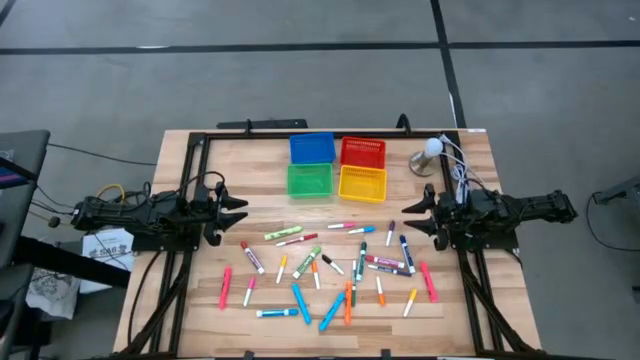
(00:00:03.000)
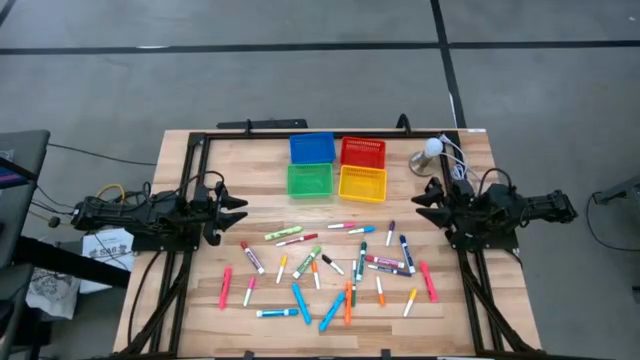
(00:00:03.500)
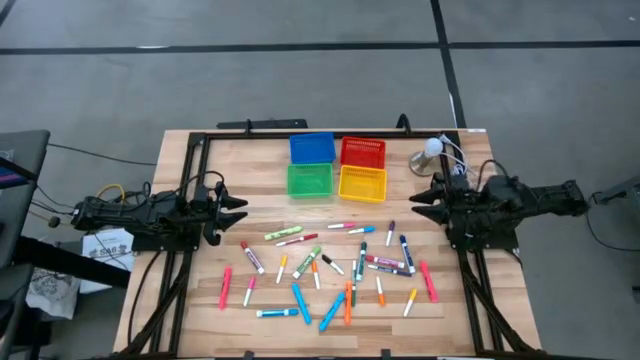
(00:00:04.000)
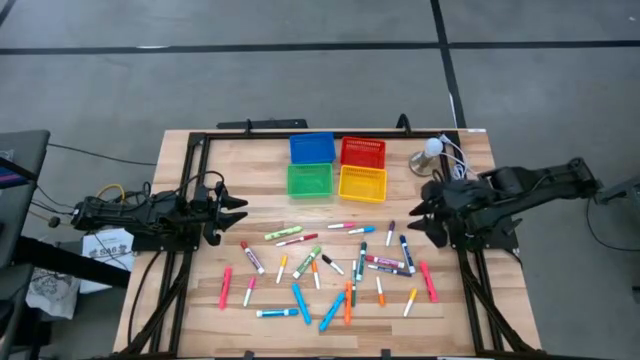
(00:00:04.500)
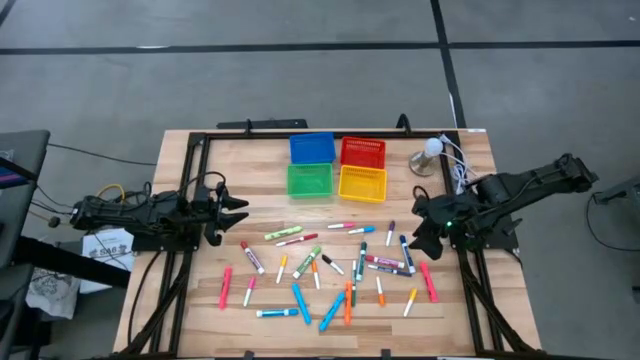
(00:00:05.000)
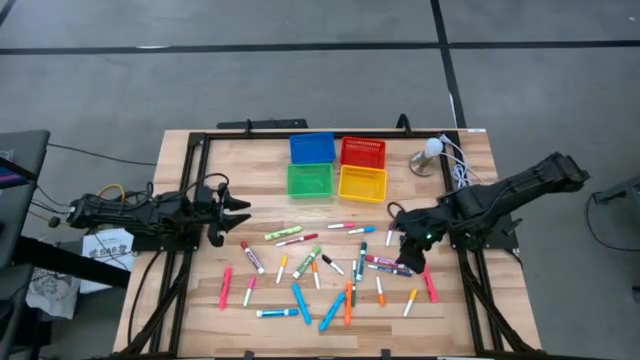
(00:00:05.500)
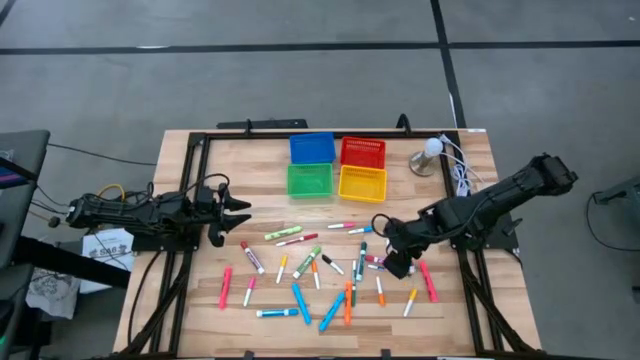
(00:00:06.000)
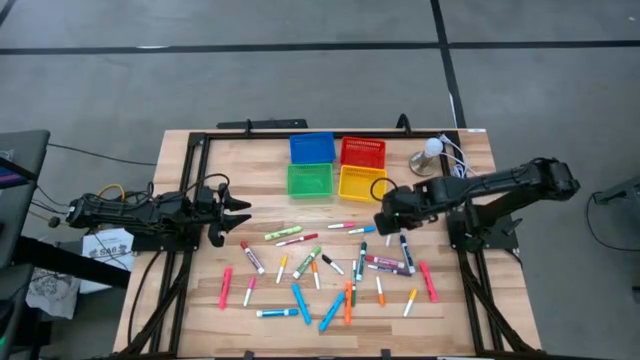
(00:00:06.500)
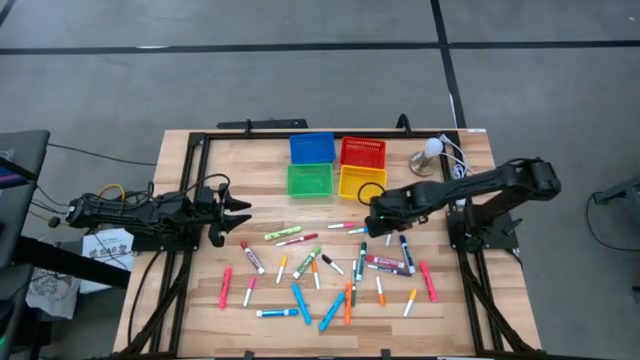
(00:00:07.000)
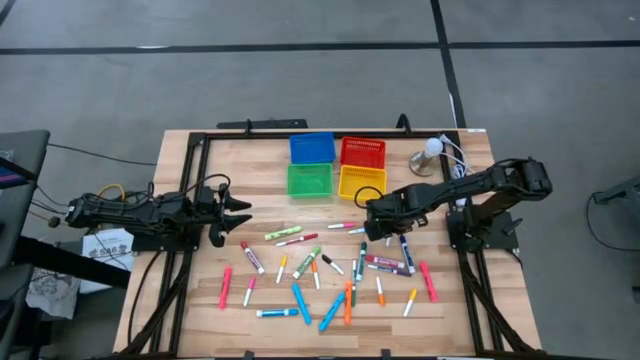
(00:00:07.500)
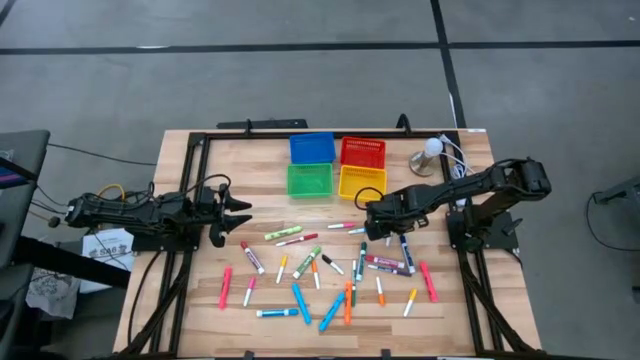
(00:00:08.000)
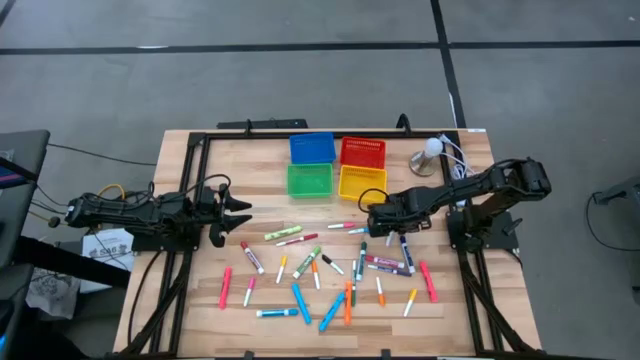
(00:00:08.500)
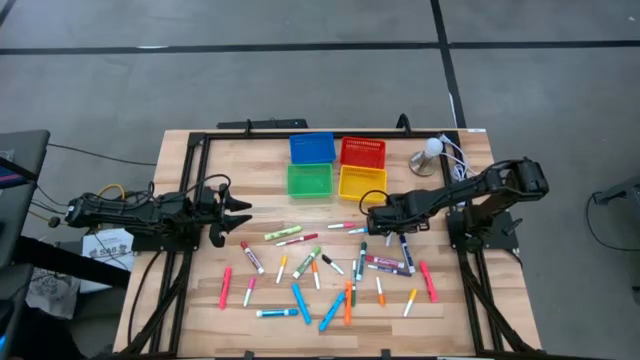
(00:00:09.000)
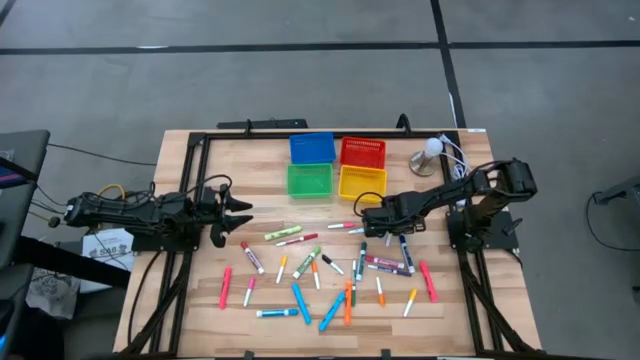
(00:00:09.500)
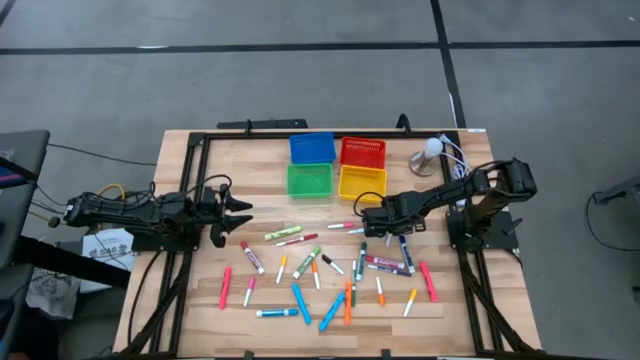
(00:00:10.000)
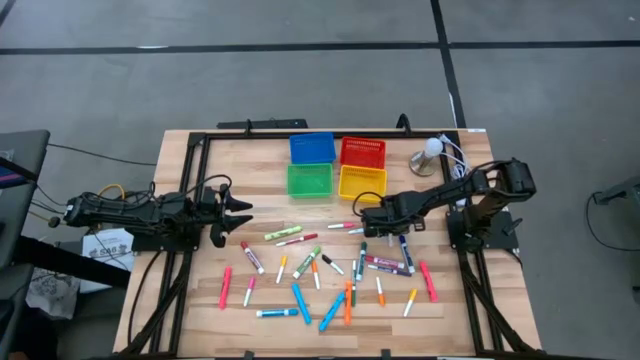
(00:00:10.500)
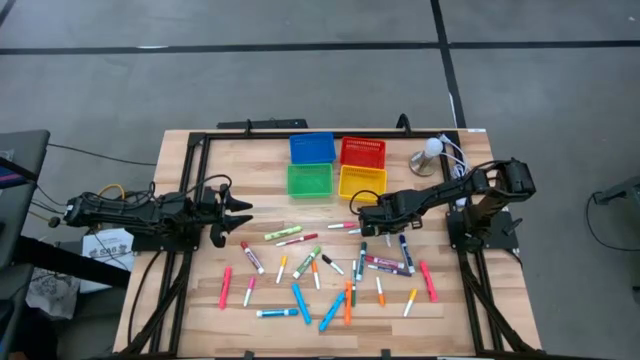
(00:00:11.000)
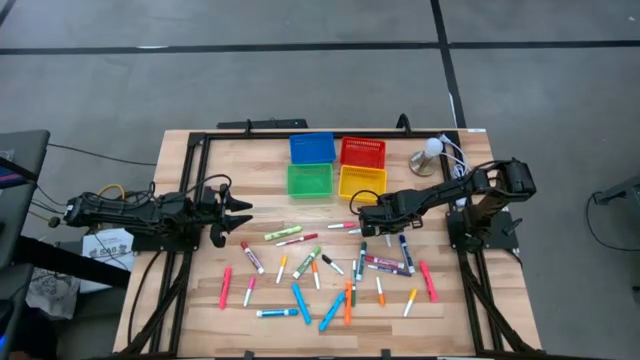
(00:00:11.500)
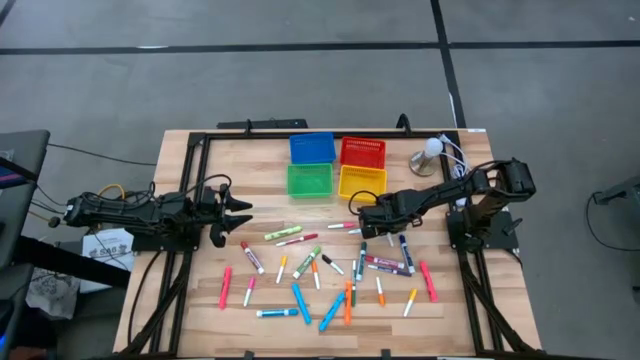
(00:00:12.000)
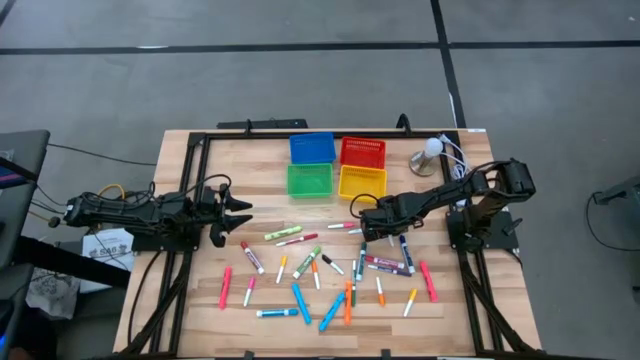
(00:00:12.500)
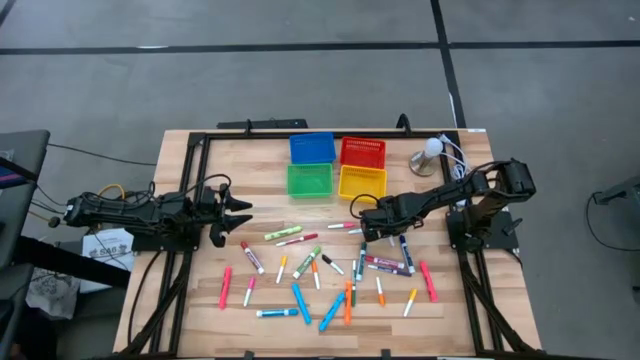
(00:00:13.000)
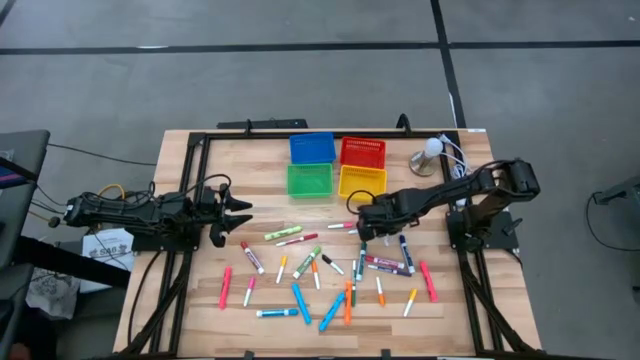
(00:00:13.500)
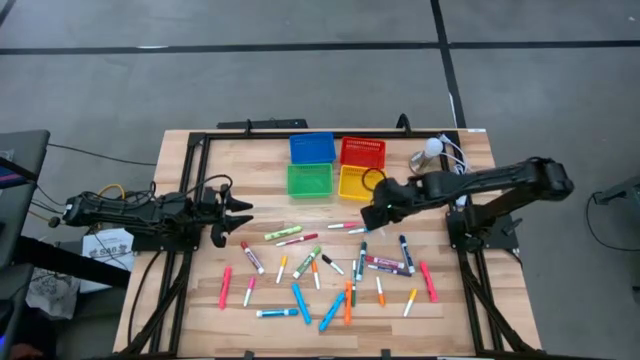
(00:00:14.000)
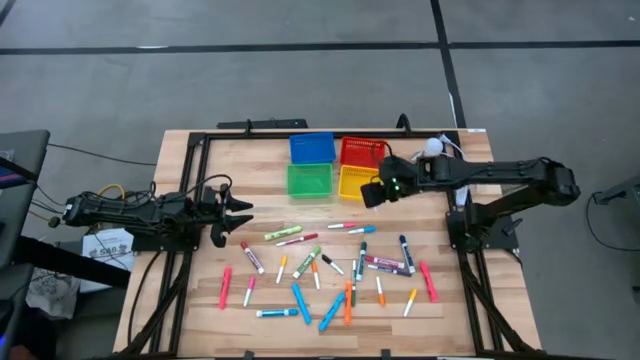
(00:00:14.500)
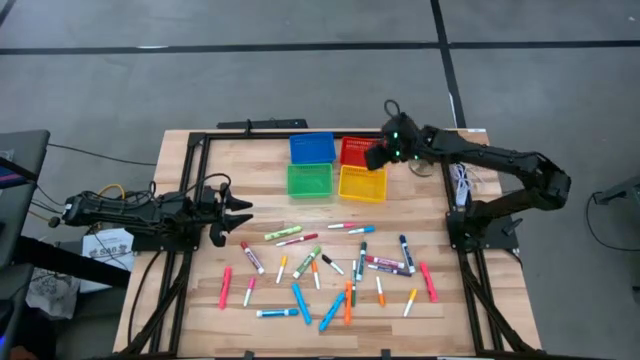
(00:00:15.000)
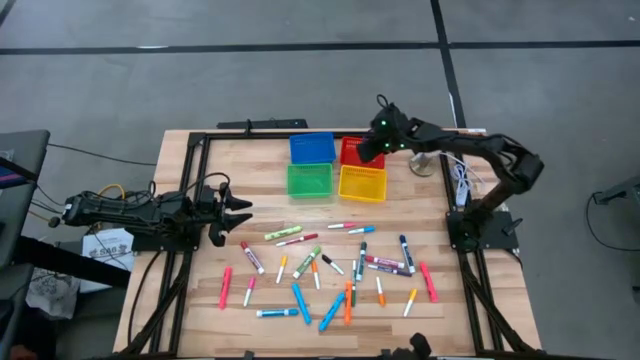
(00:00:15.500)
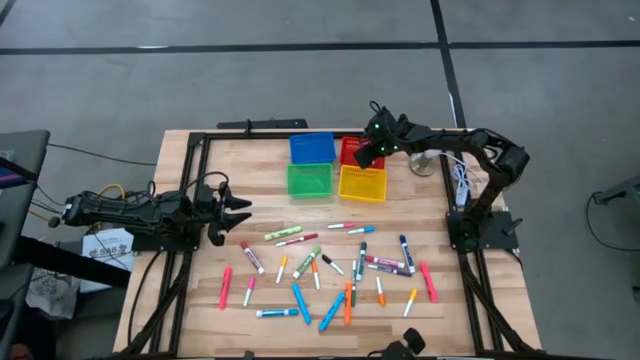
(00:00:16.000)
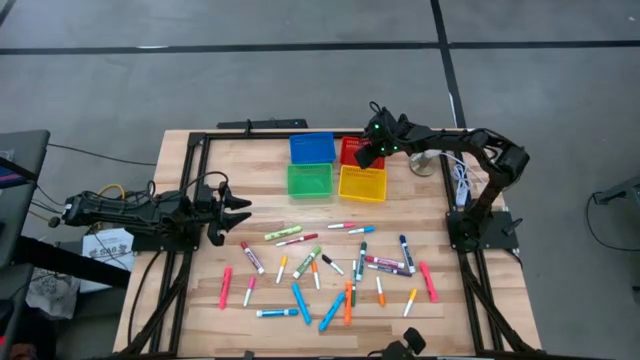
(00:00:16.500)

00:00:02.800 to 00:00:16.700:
Task: Pick & Place Markers
Put the purple highlighter into the red bin

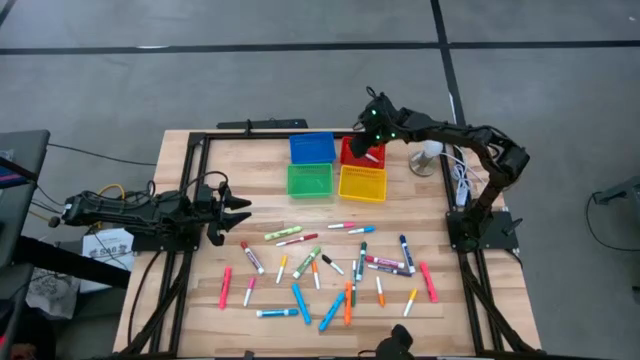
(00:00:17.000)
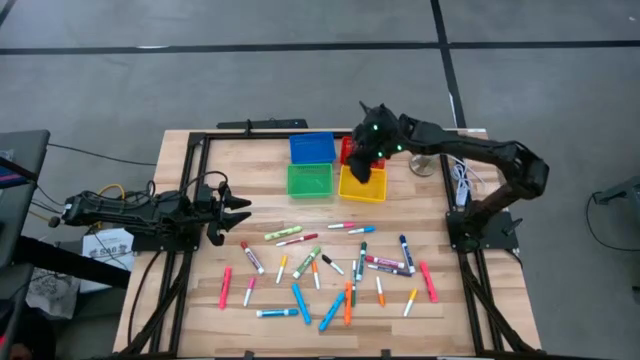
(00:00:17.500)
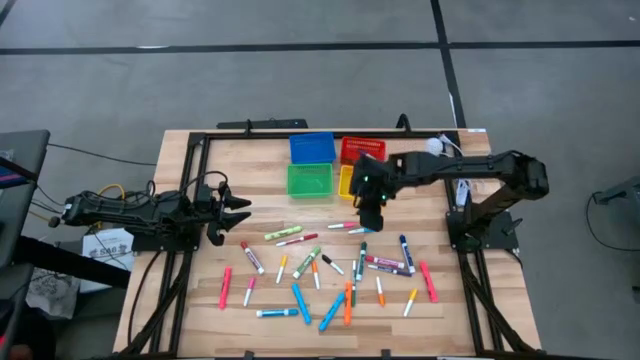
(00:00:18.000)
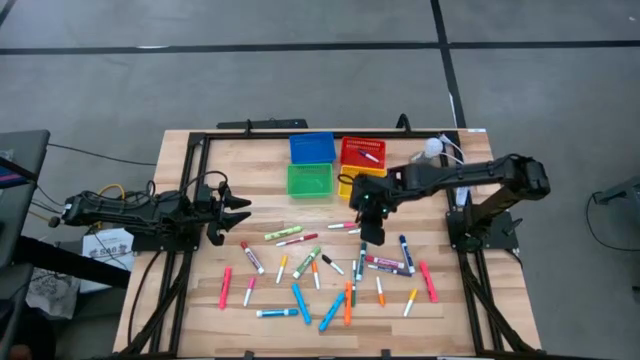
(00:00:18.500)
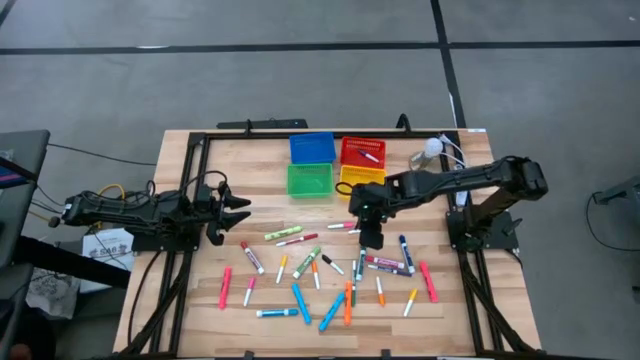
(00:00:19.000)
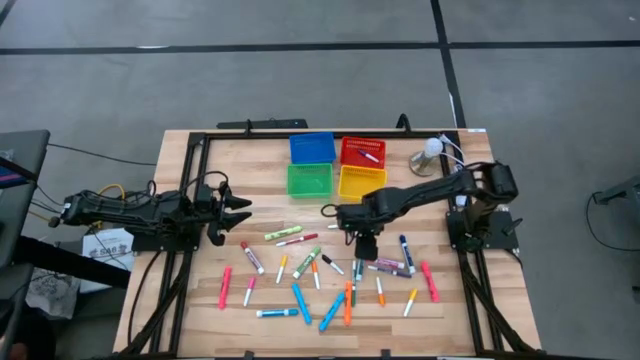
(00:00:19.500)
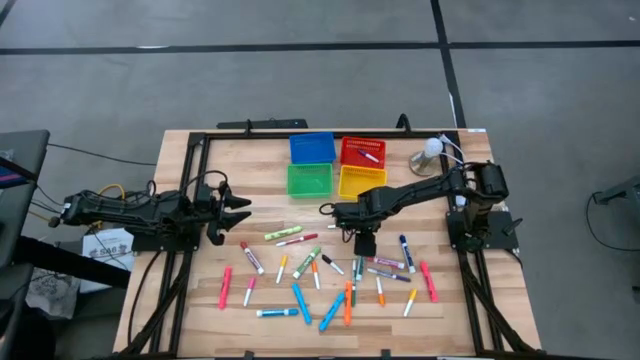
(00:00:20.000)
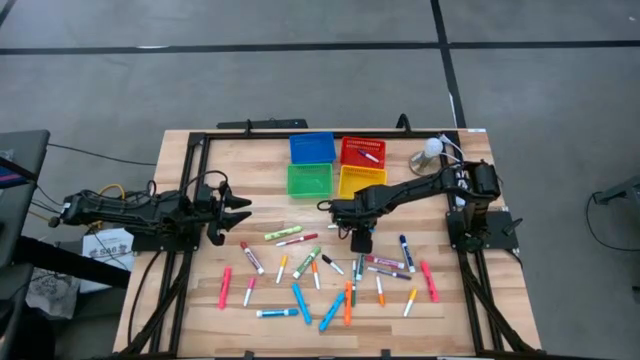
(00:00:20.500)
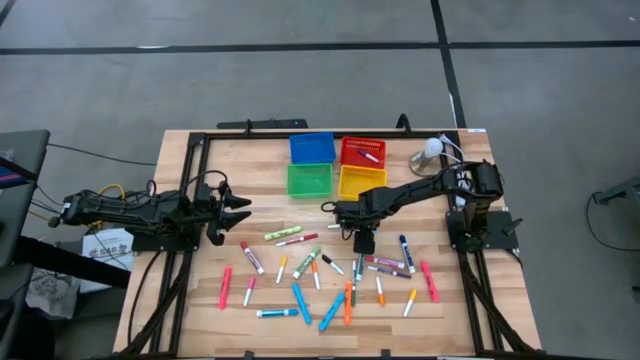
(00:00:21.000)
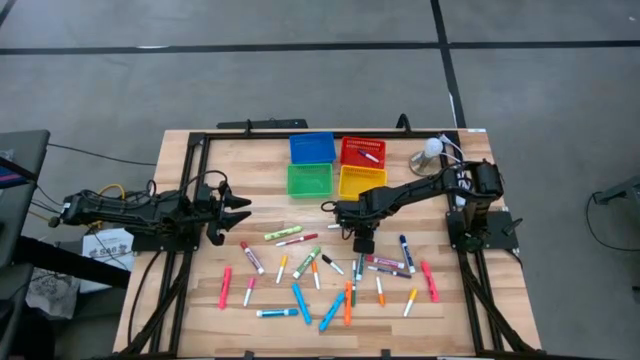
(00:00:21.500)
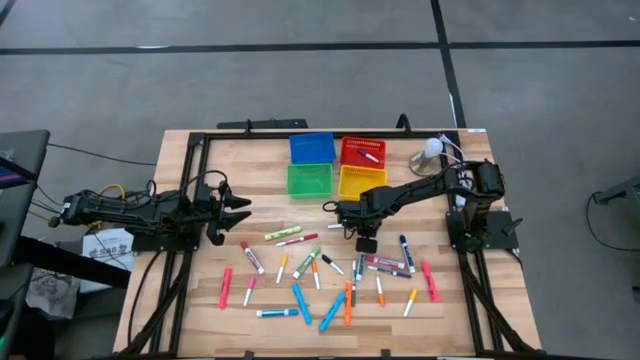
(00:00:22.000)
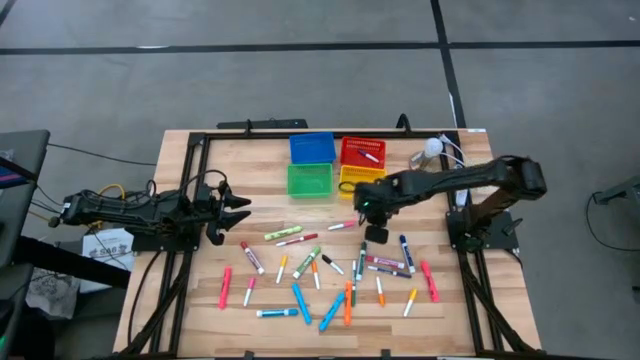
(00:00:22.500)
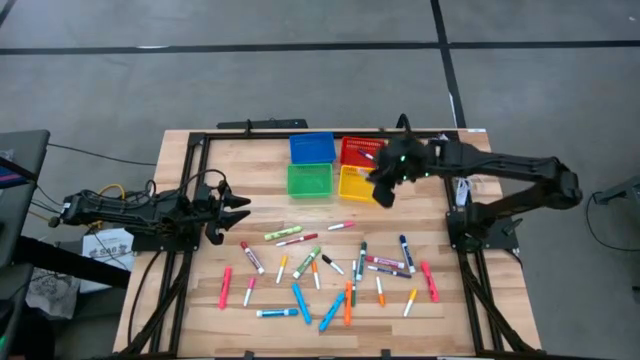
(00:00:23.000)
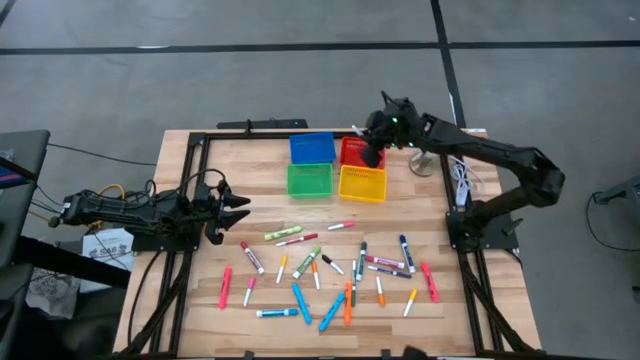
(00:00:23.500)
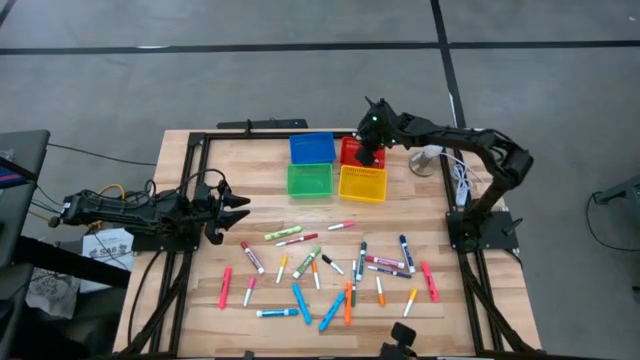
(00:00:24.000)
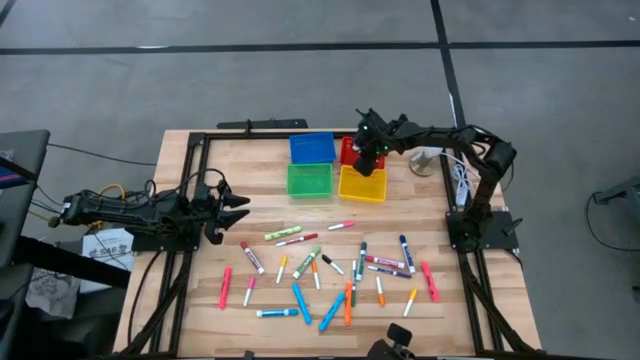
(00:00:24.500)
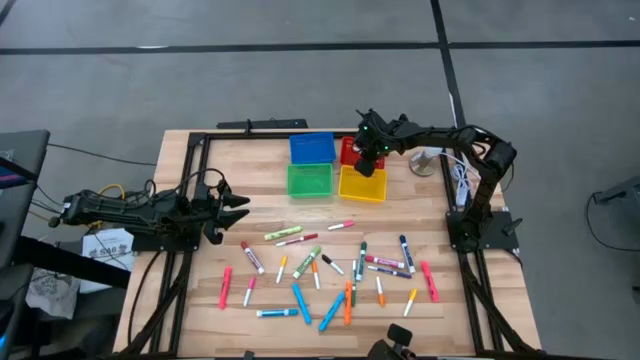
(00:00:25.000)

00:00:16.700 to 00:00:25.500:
Put the blue highlighter into the red bin
